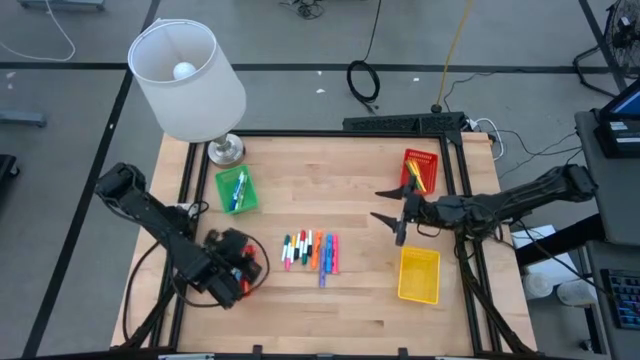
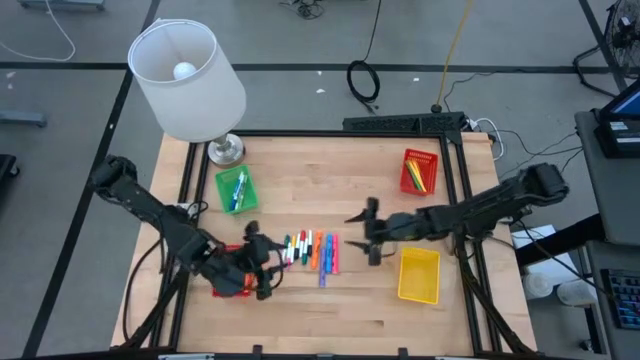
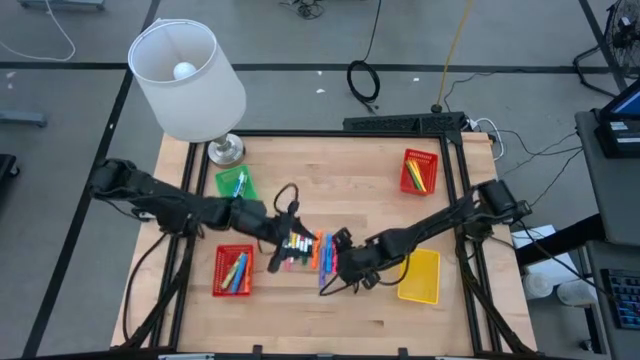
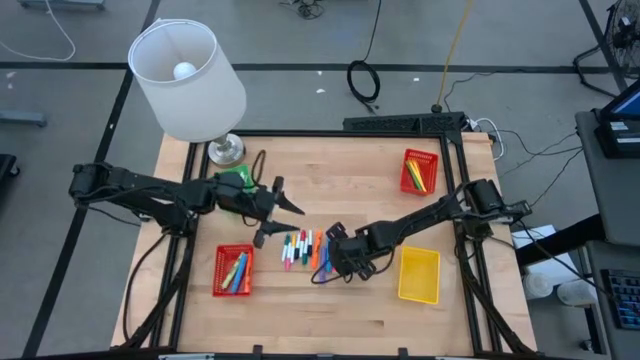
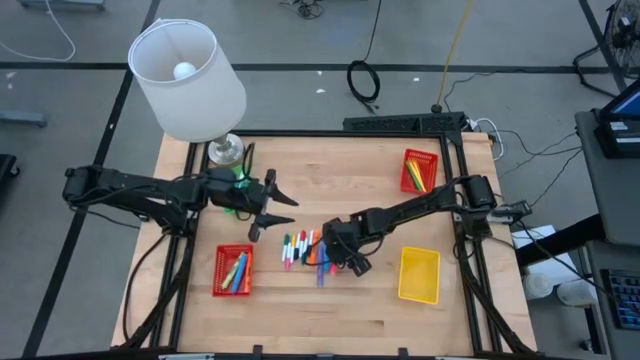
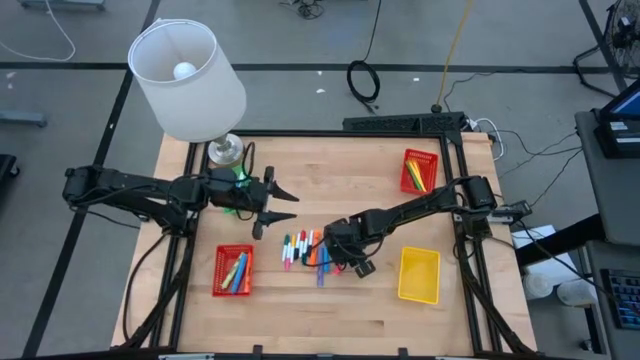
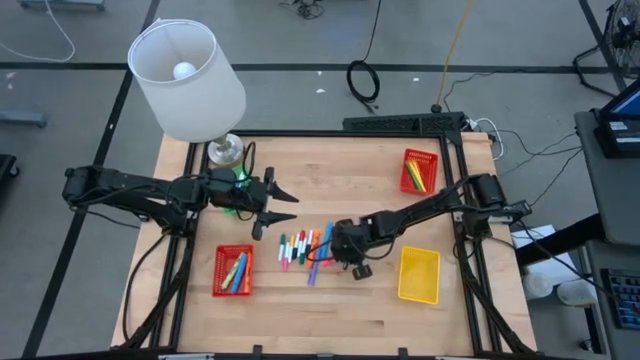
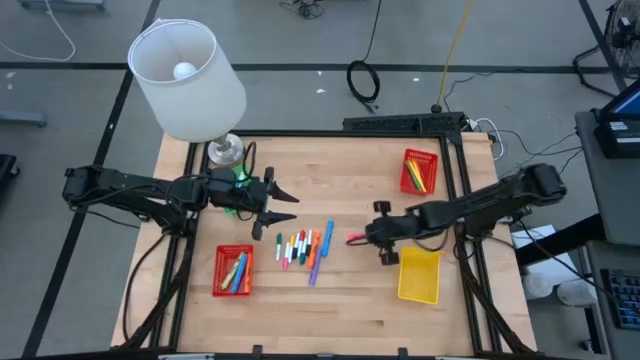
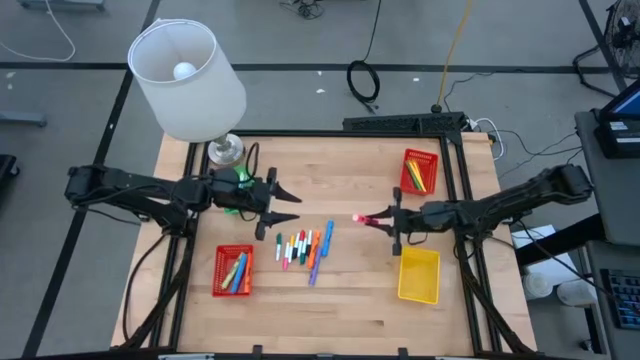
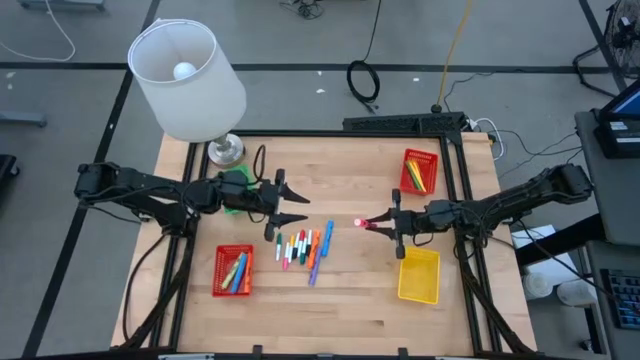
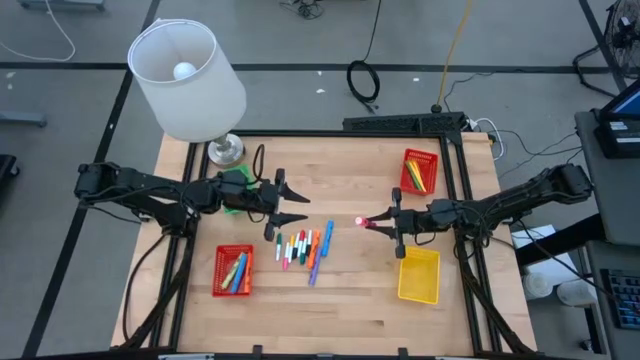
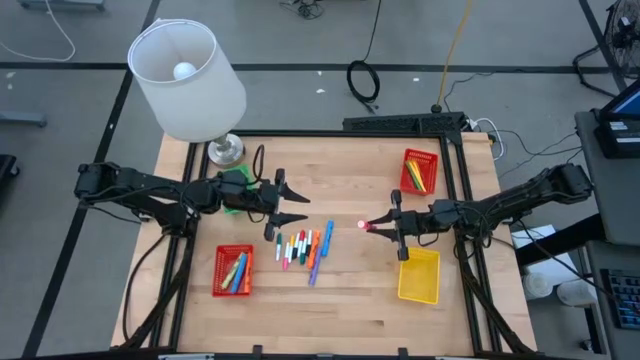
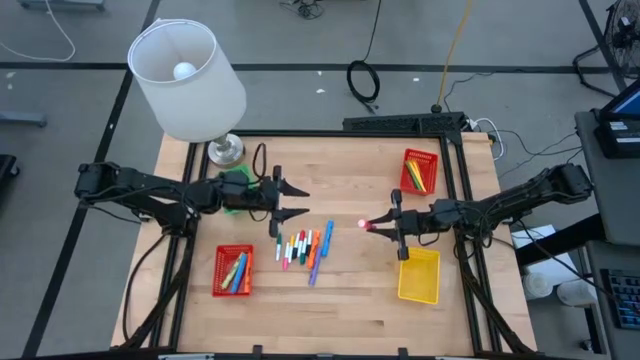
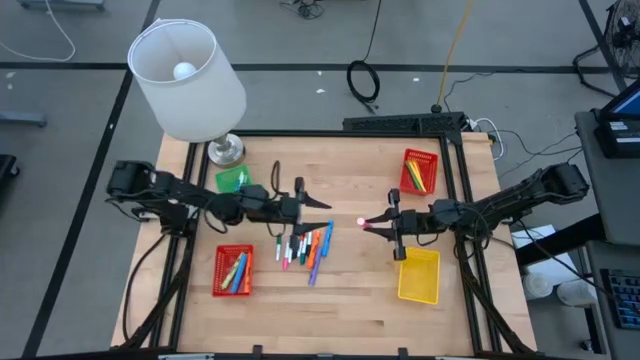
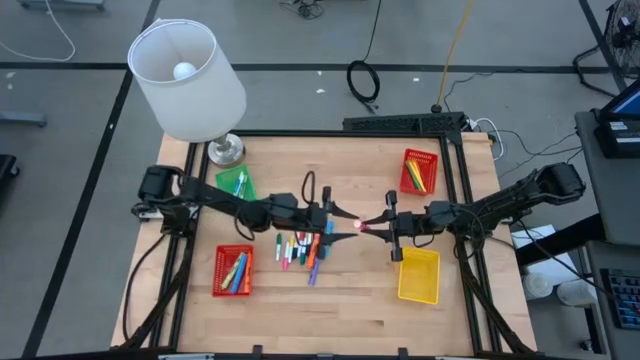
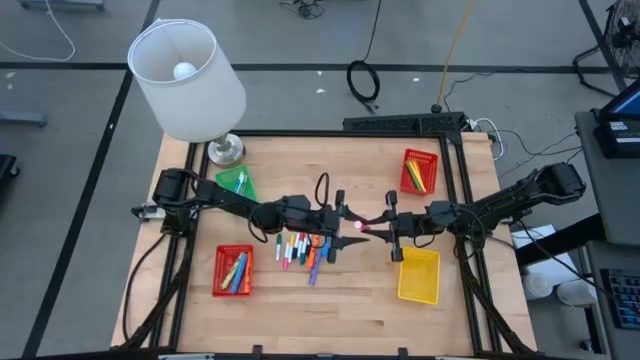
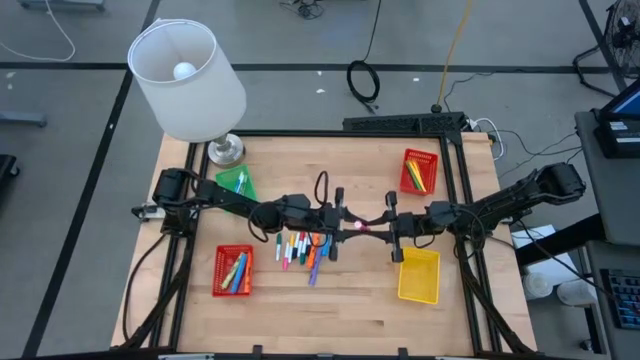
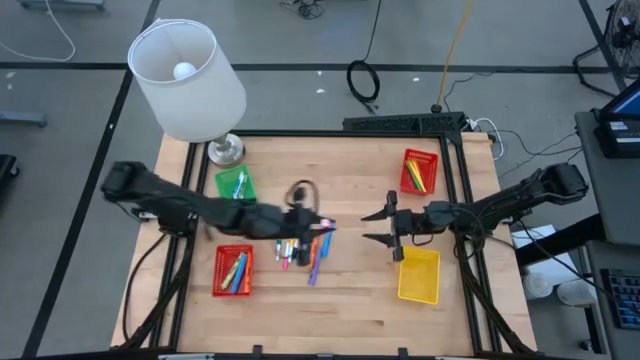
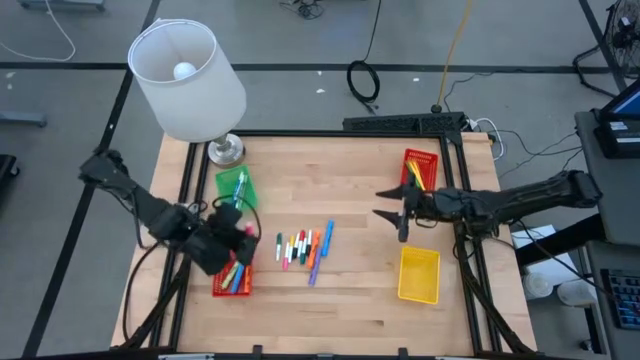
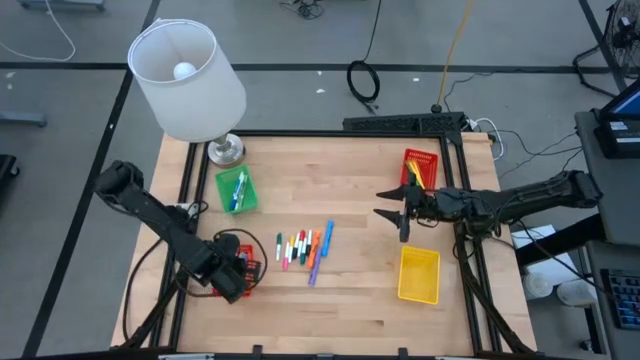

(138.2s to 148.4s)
Task: Pick & Place Markers
Put the pink highlighter pen into the bottom red basket

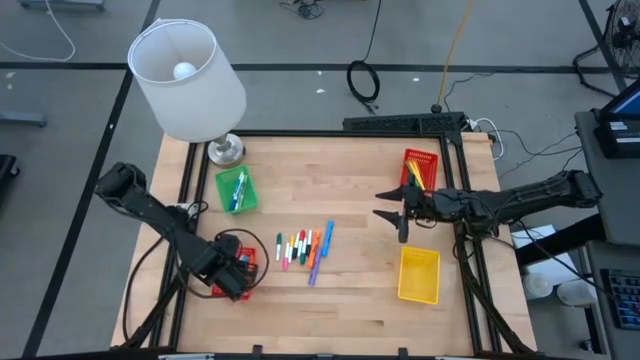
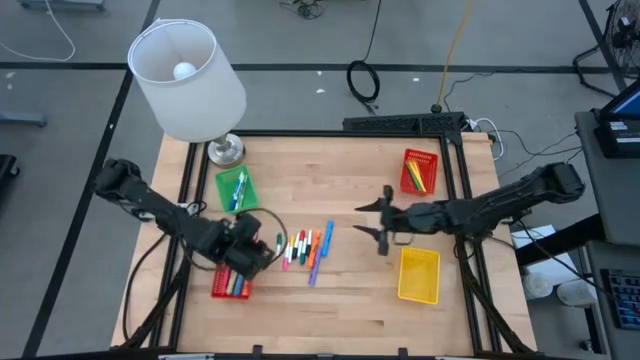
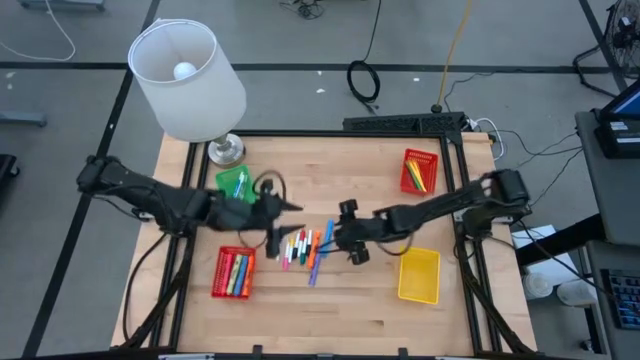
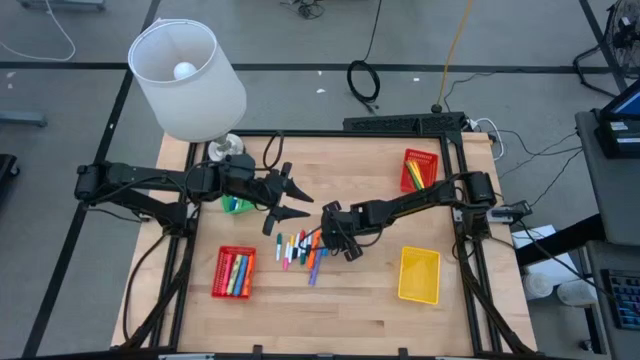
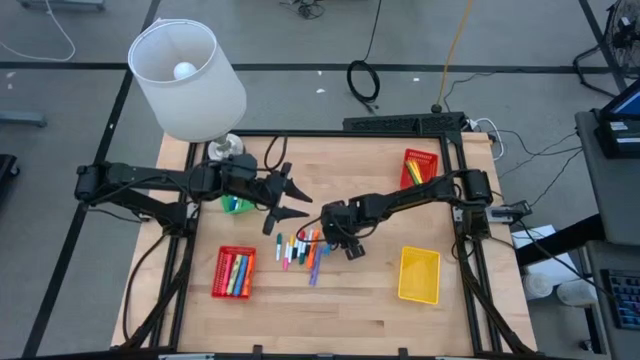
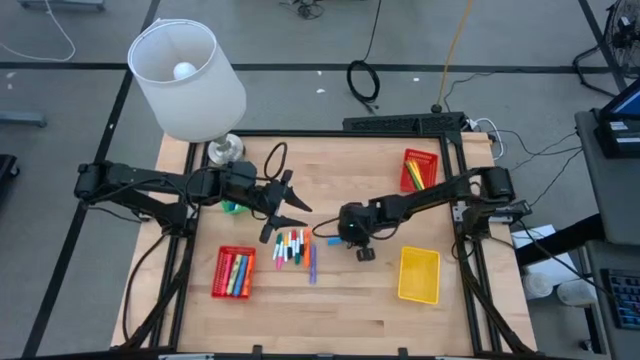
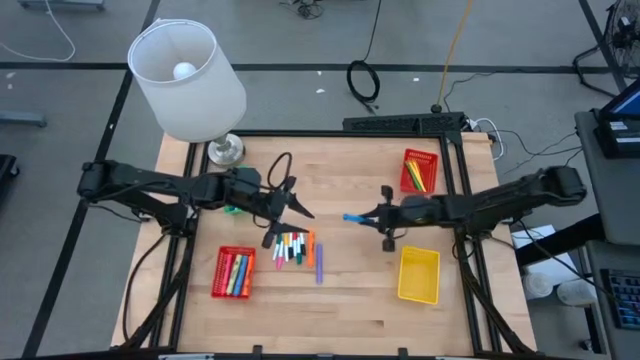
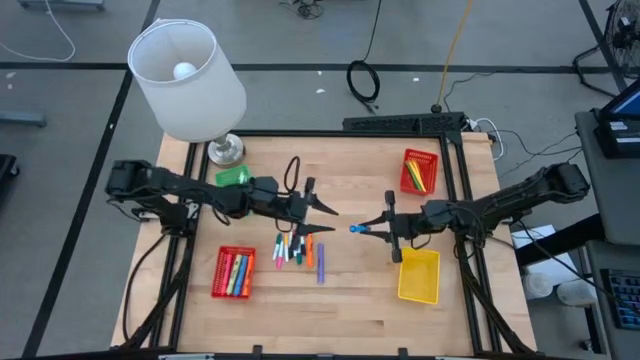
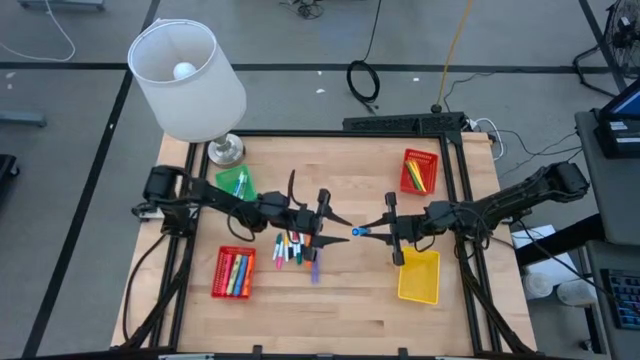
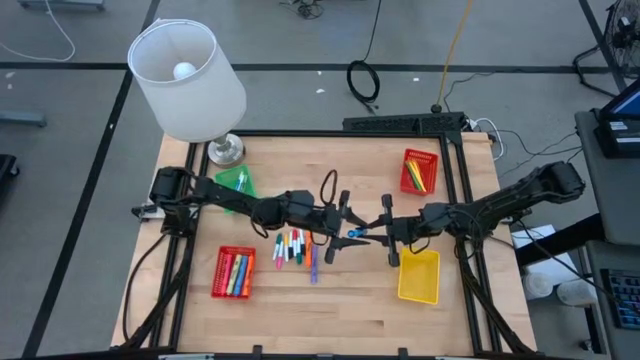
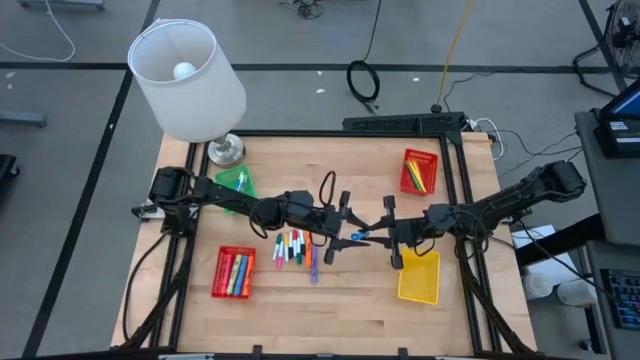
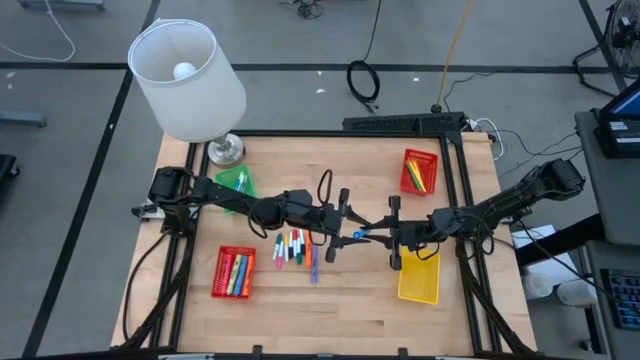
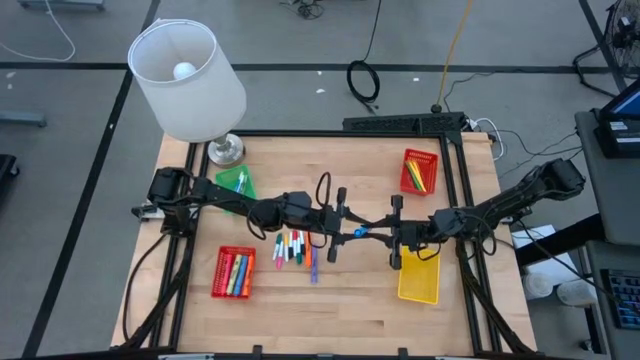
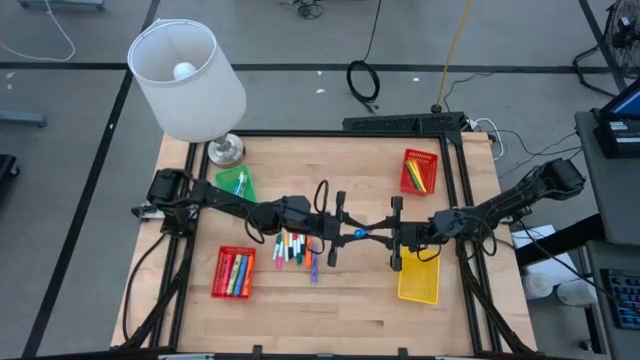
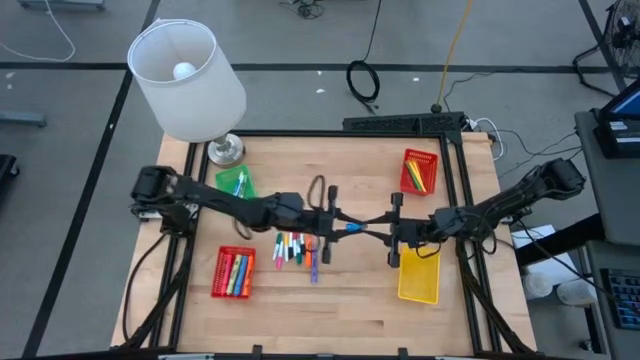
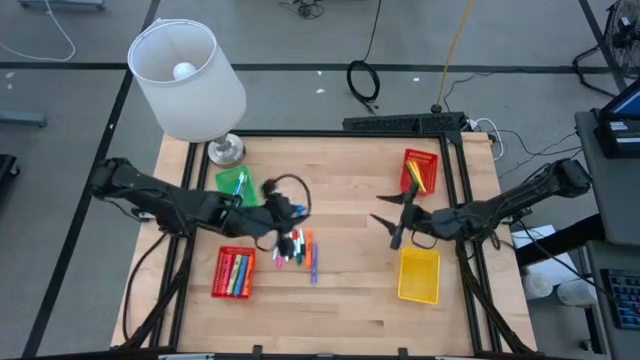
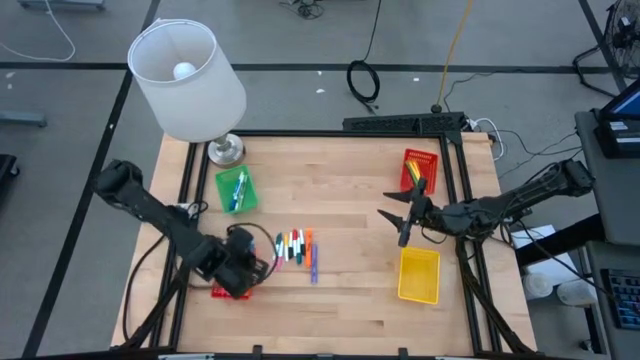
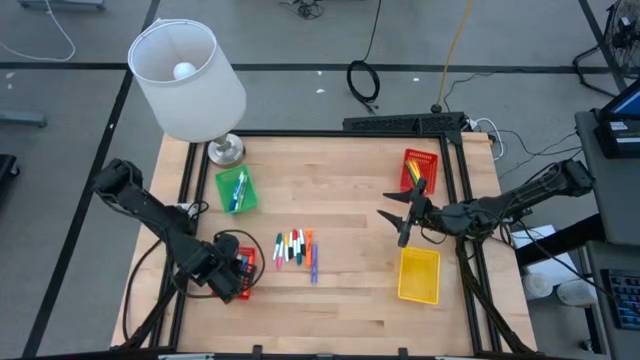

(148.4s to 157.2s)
Put the blue highlighter pen into the bottom red basket

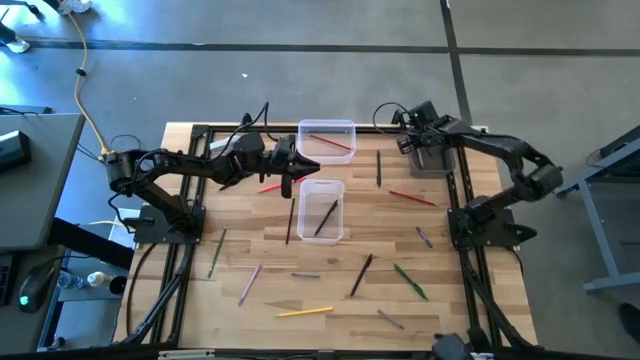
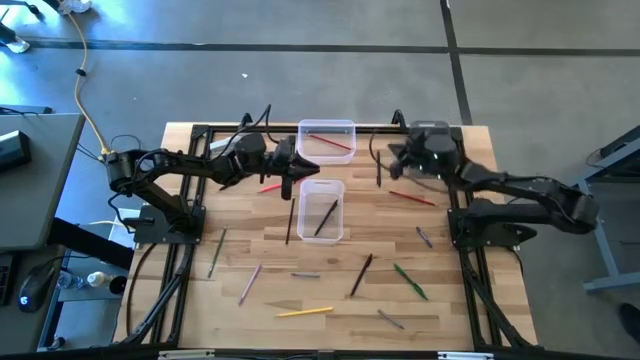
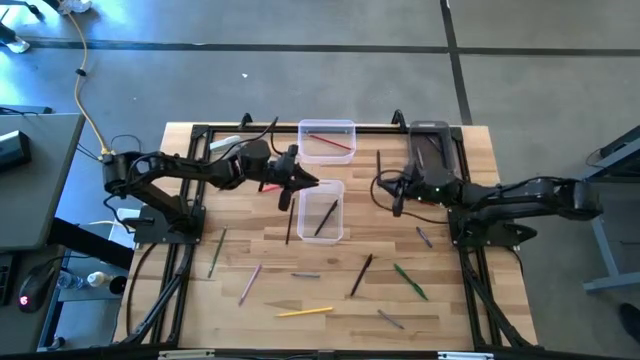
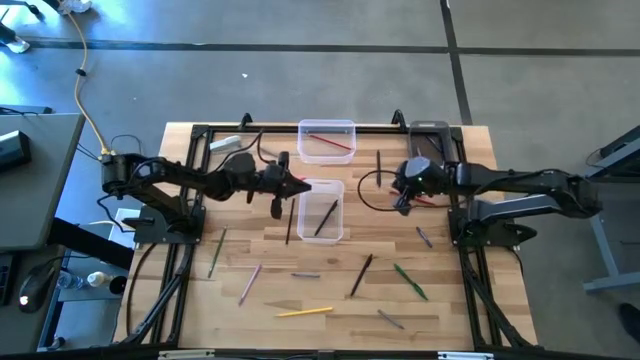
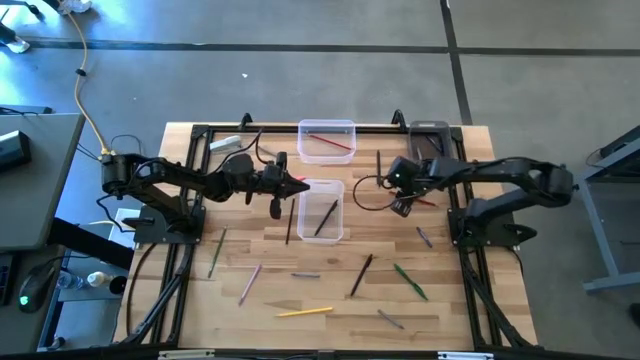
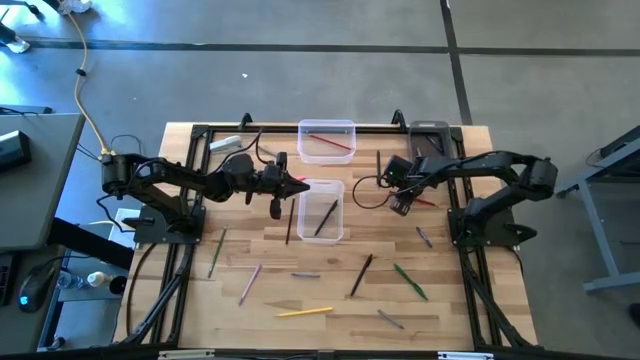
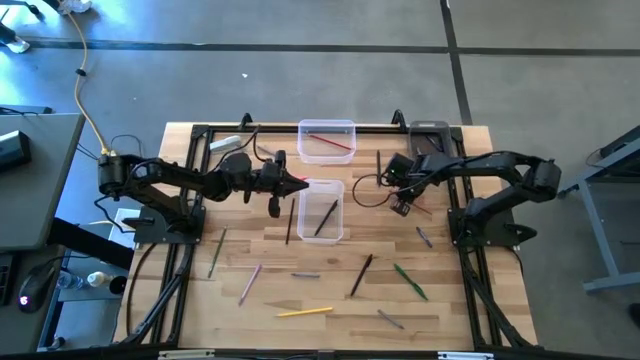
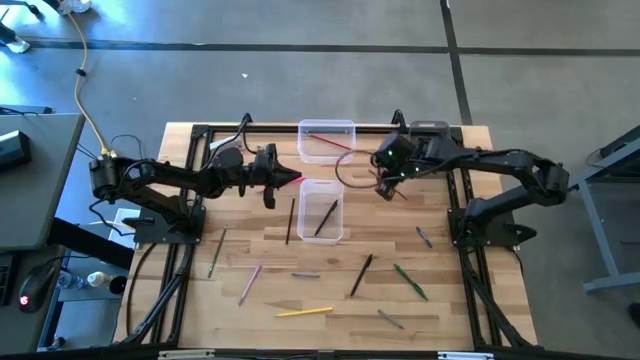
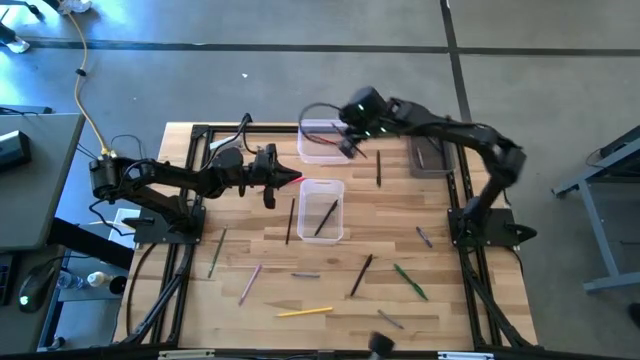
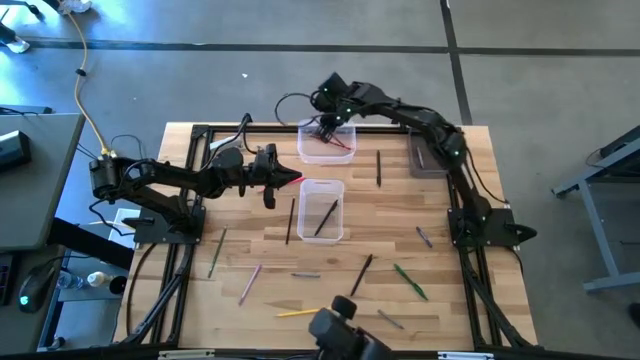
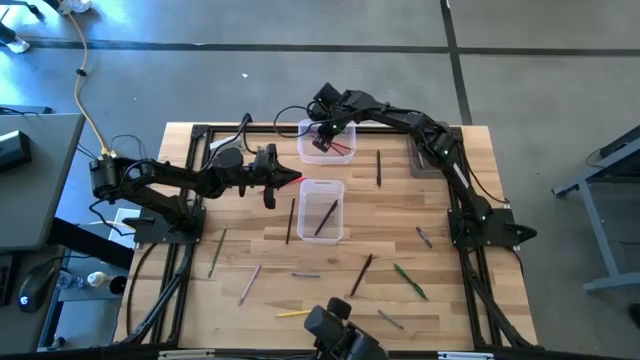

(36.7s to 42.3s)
Task: Sort crayons/erasers/pens/pencils in bins
Put the red color pencil into the top transparent bin
